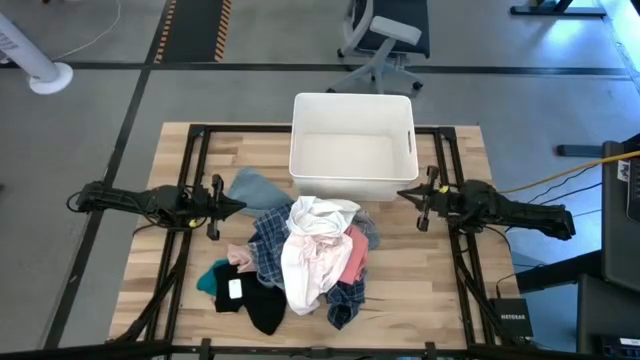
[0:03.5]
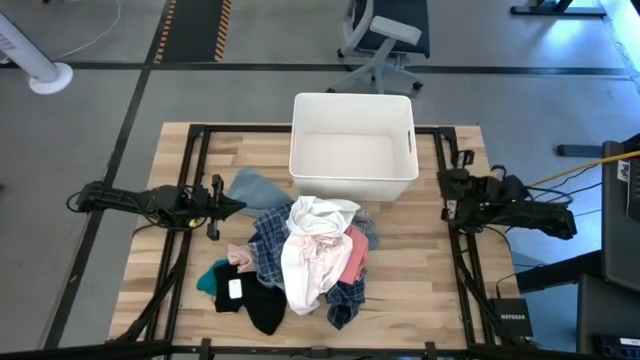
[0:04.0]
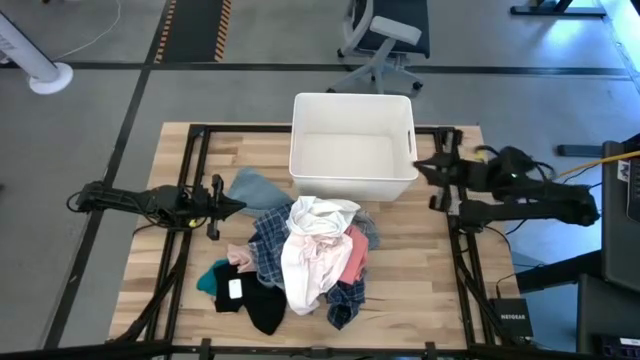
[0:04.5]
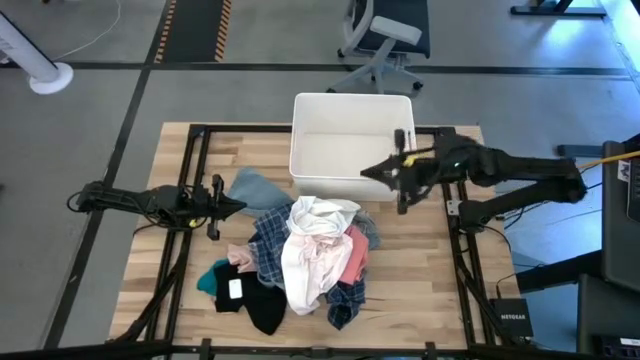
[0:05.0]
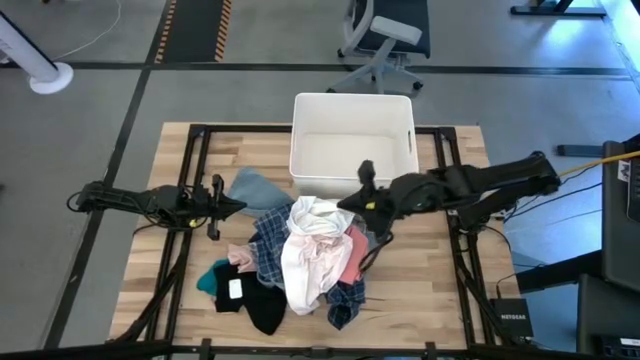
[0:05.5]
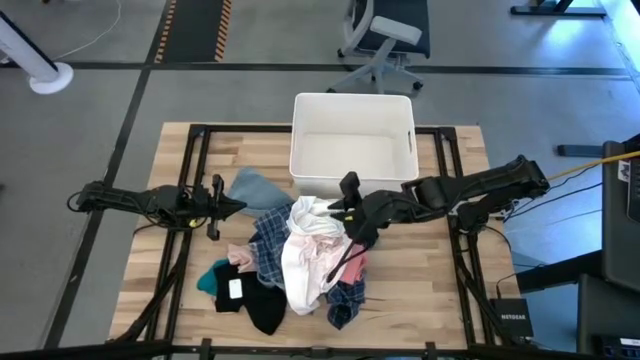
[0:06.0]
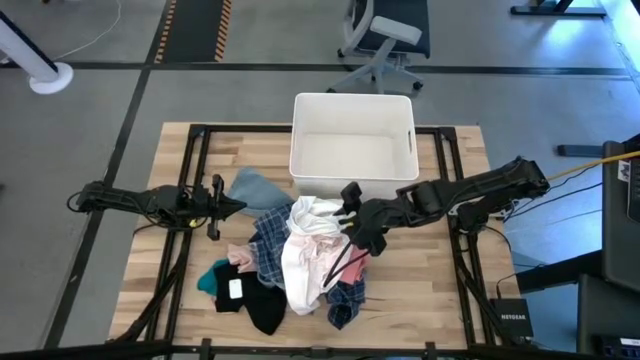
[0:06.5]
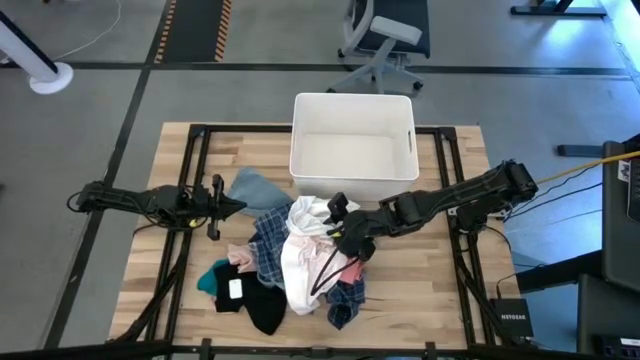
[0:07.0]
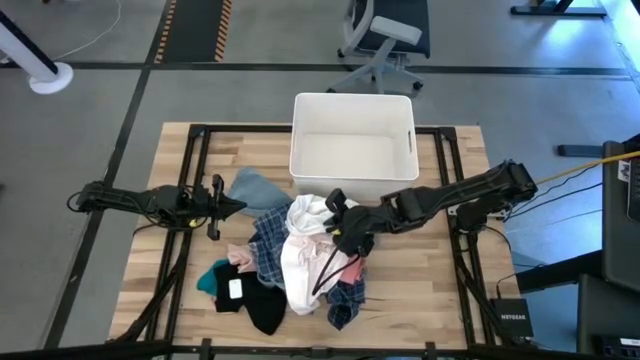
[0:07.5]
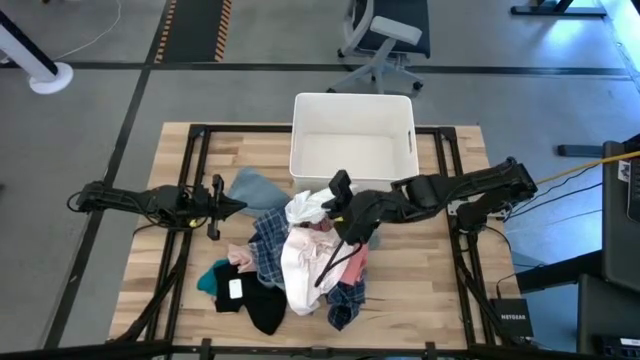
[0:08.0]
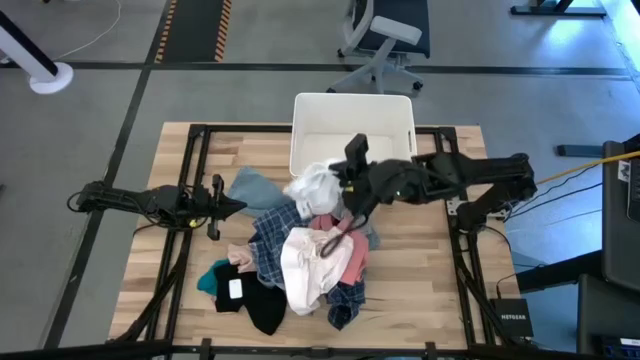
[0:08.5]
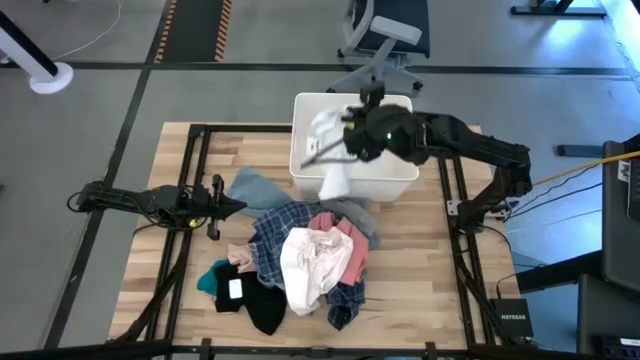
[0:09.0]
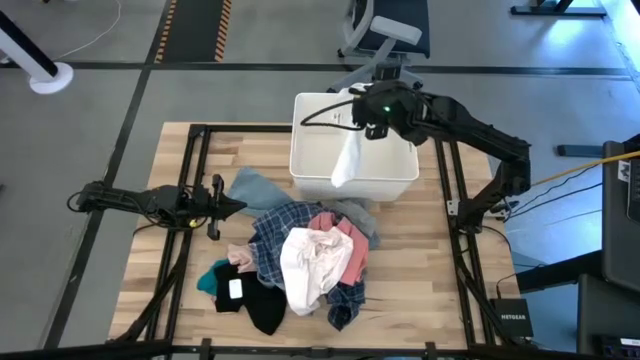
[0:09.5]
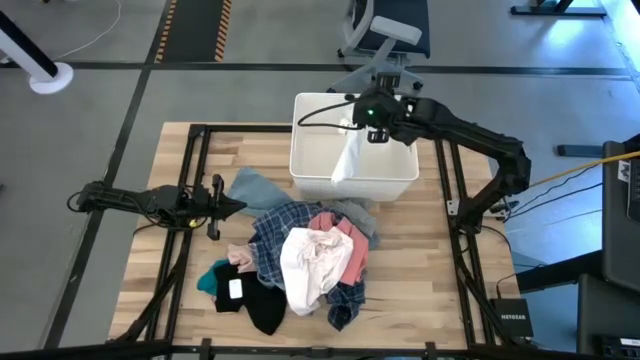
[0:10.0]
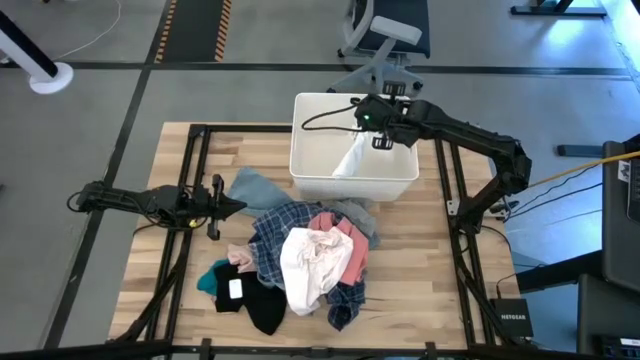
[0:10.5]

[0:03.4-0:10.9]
Task: Sort clothes
Put the white shorts into the white laundry bin

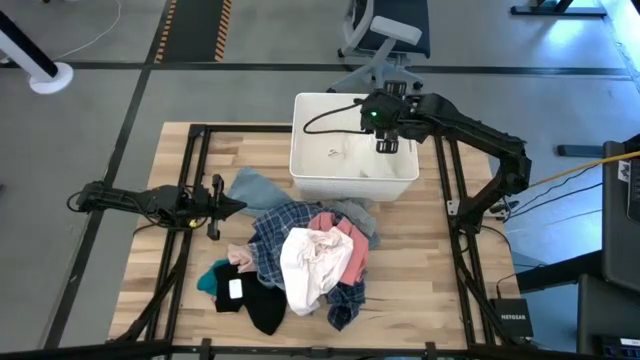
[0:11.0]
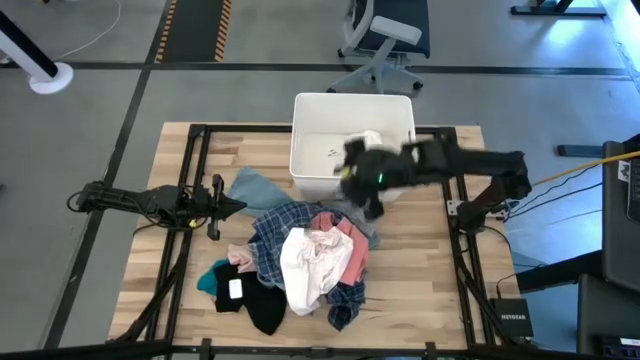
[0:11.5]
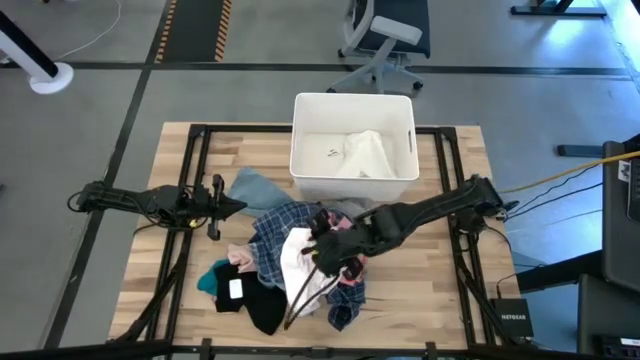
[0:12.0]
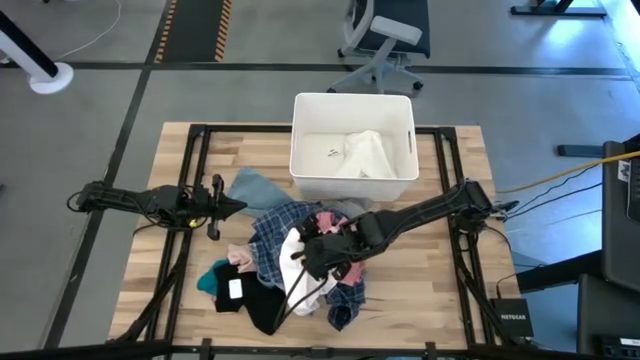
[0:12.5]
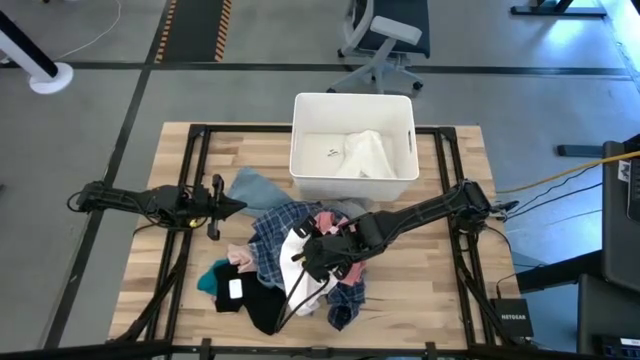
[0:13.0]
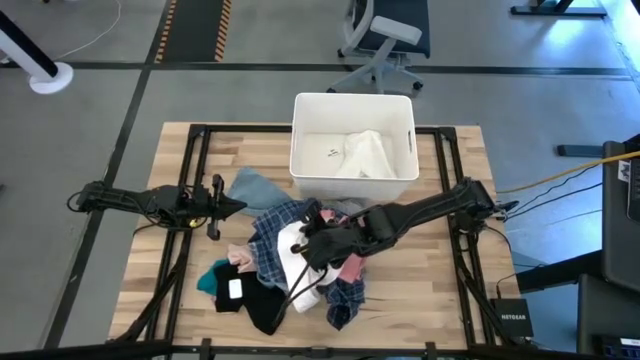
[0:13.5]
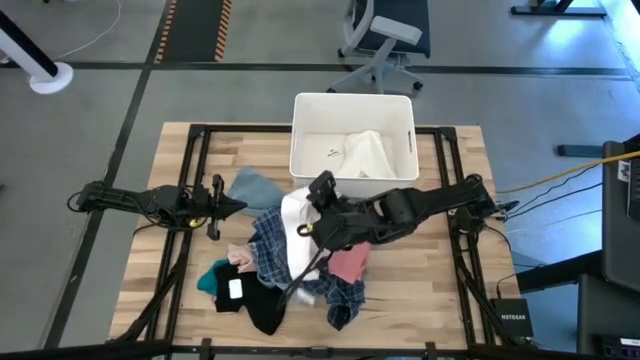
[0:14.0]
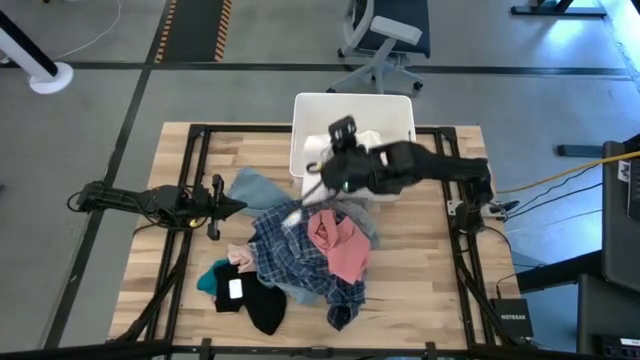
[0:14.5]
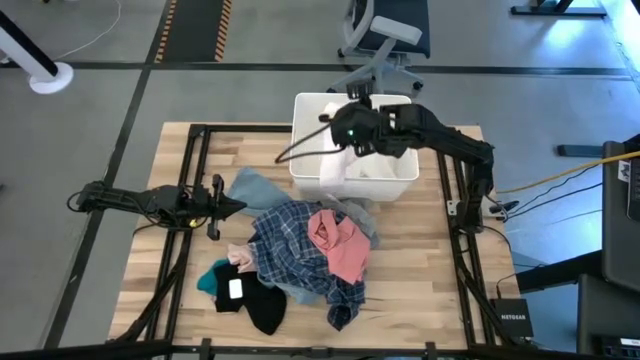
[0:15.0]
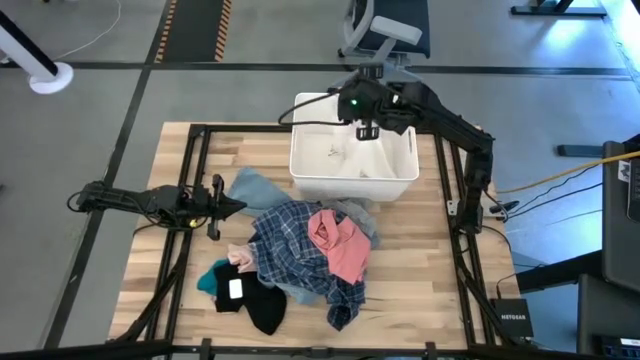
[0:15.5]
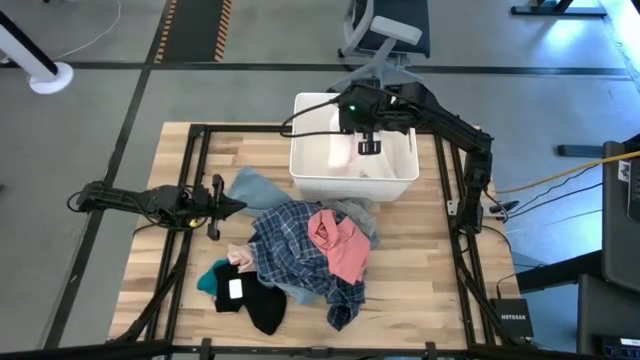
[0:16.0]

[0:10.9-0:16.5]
Put the light pink underwear into the white laundry bin

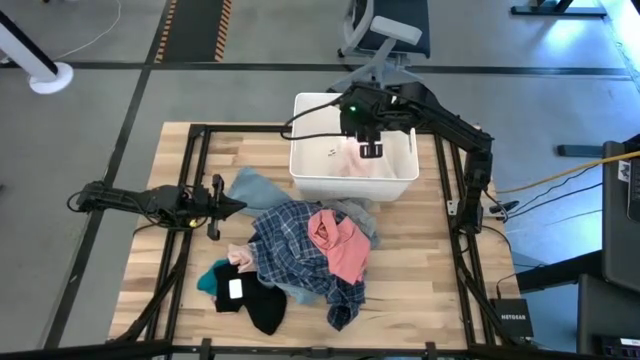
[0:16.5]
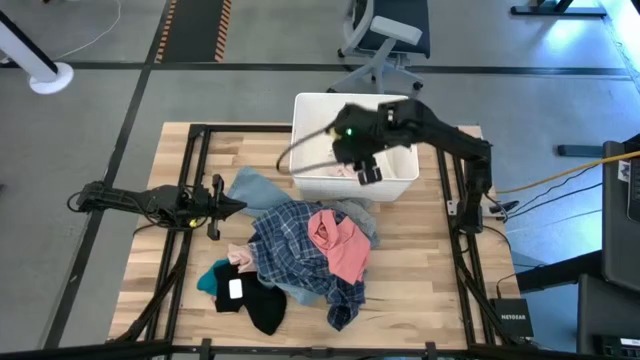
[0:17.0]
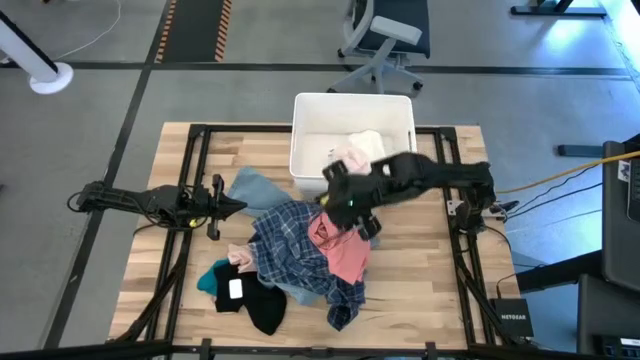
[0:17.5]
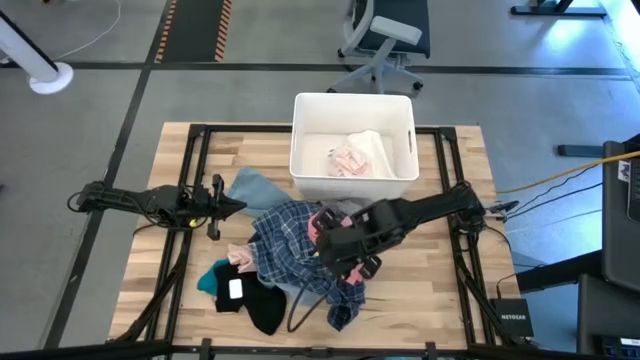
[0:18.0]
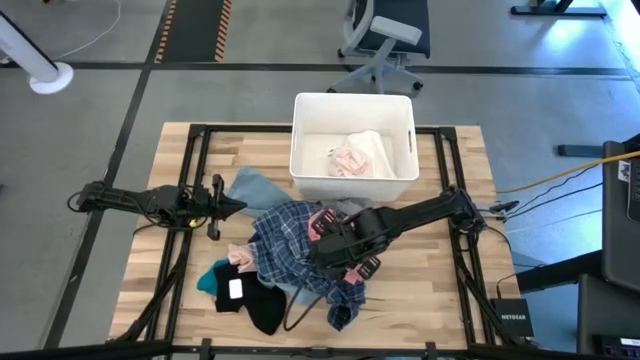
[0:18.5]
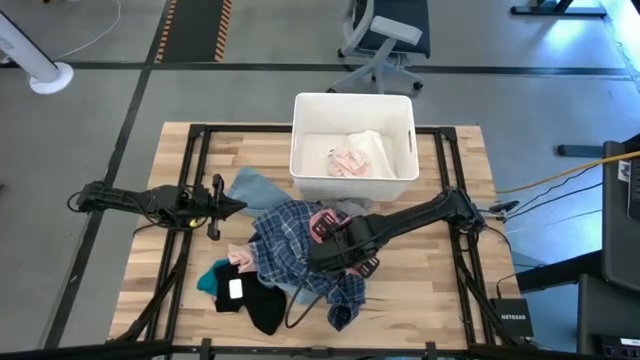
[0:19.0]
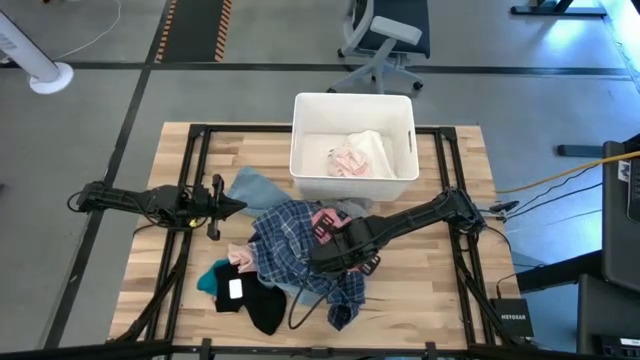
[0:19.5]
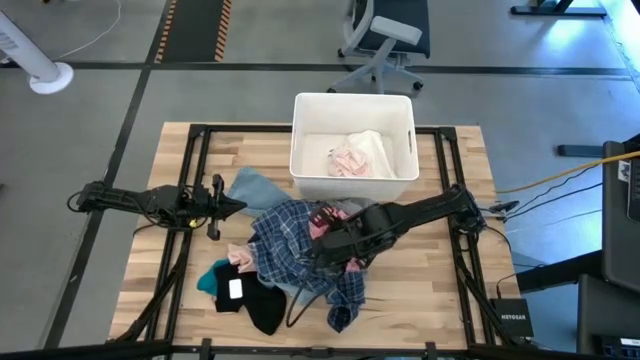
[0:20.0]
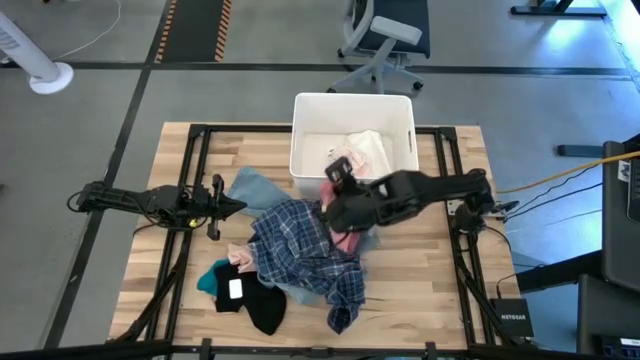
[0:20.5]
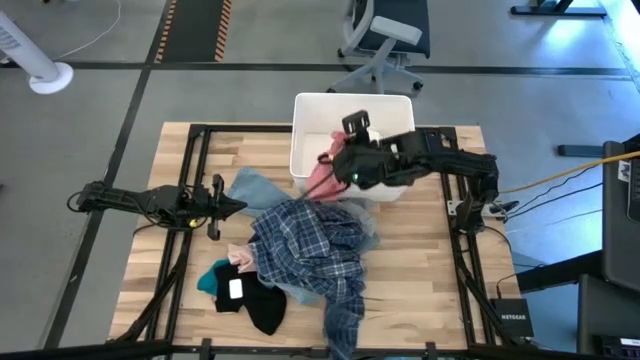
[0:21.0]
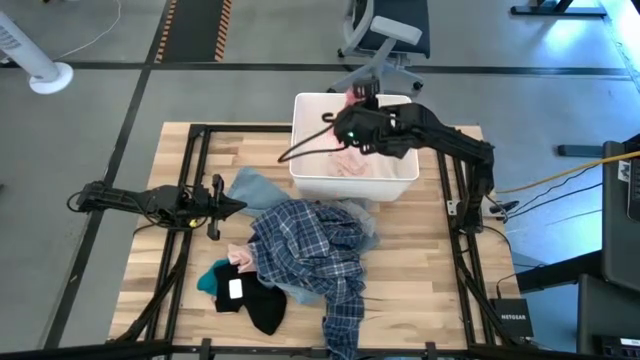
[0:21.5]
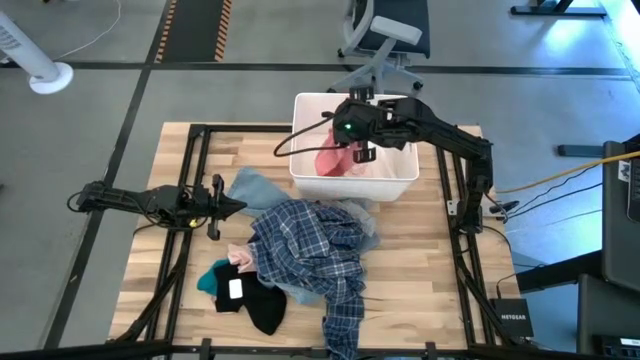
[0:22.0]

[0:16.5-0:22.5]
Put the pink underwear into the white laundry bin

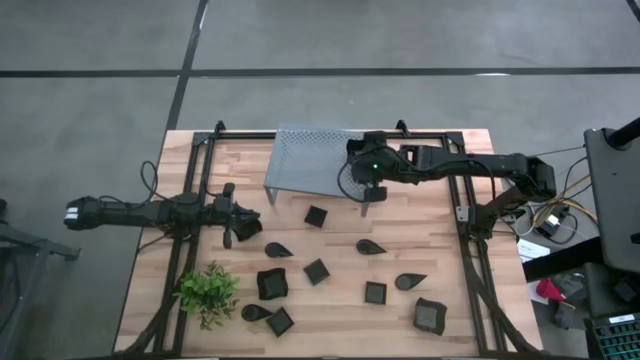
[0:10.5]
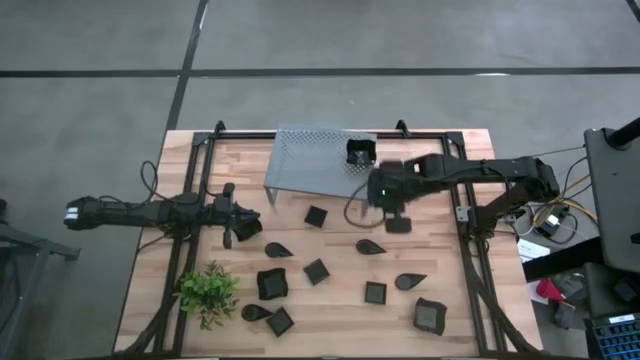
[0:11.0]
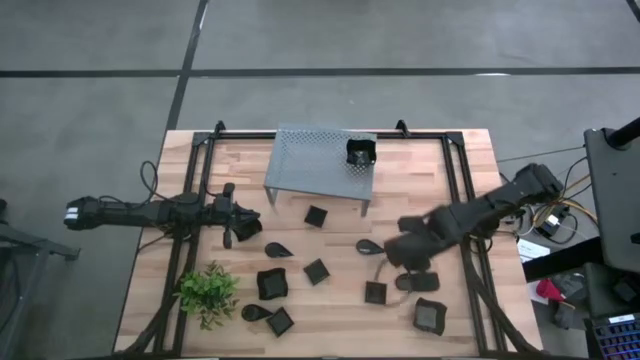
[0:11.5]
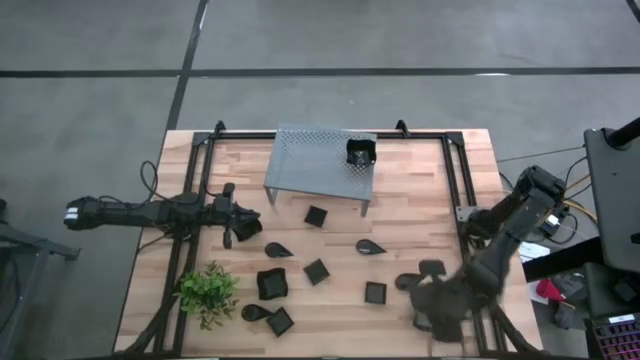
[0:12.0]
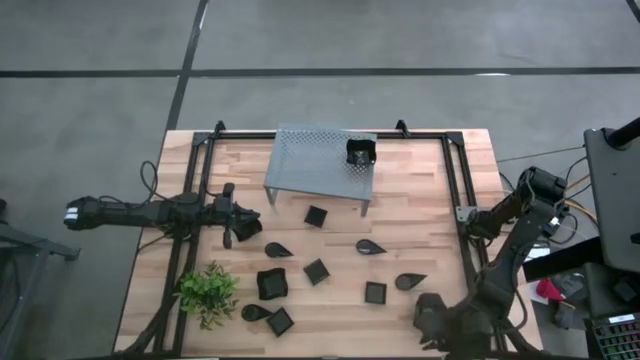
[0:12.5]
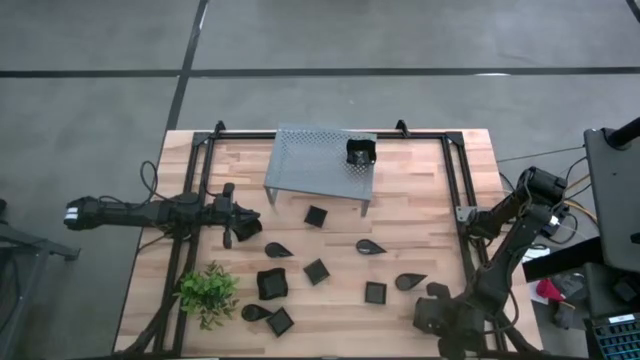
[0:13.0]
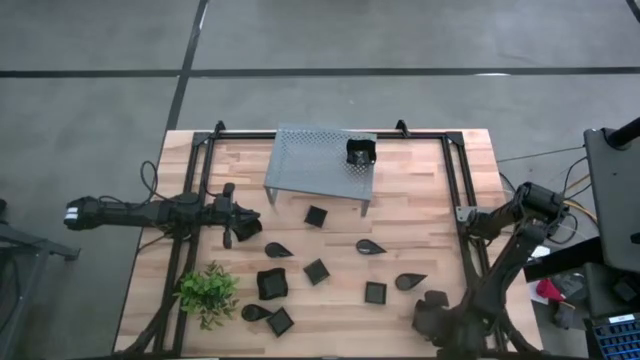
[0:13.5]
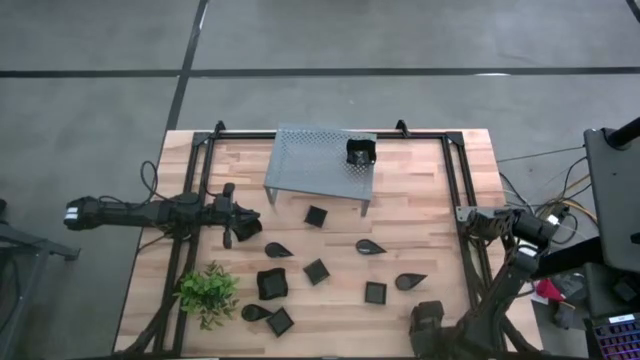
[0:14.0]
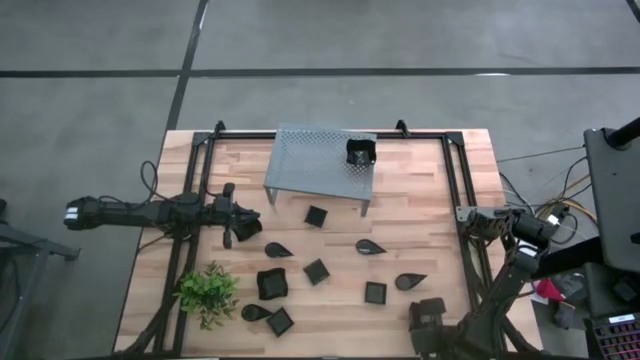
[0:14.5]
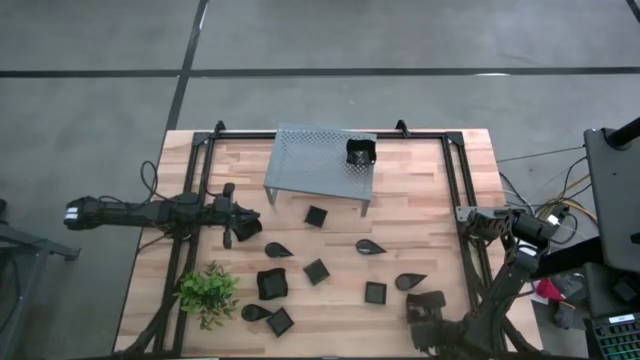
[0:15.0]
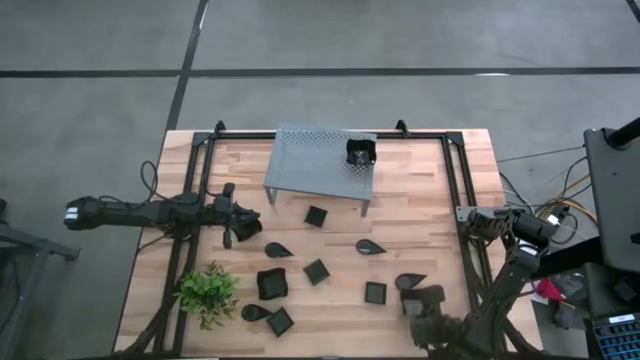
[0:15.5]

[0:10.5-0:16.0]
Task: Pick & Place Mini shaped plates
Stack the black distorted square plate on top of the other black distorted square plate on the shelf
